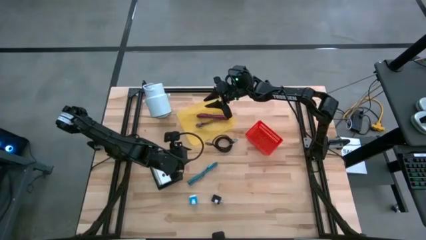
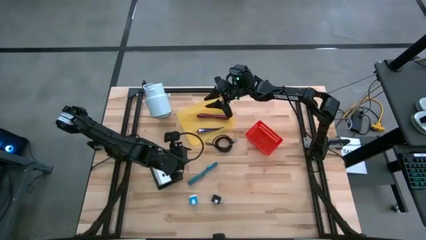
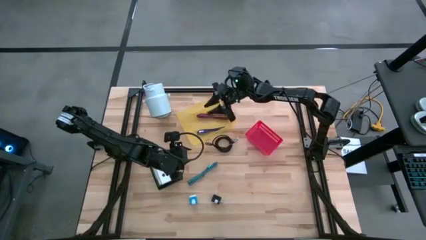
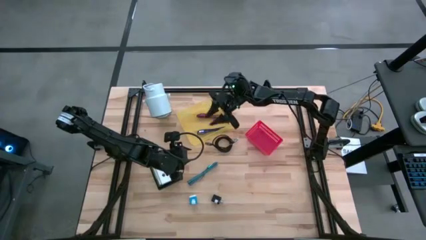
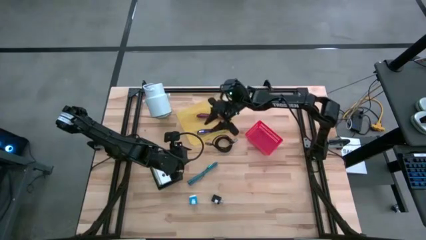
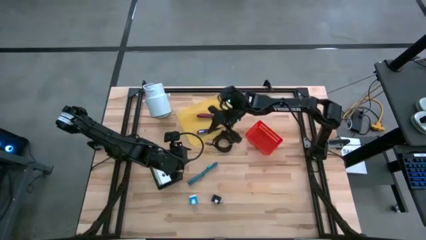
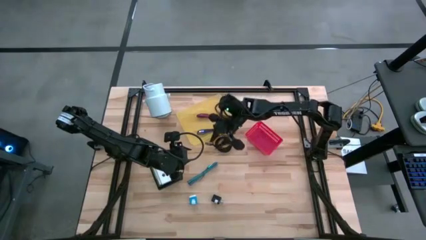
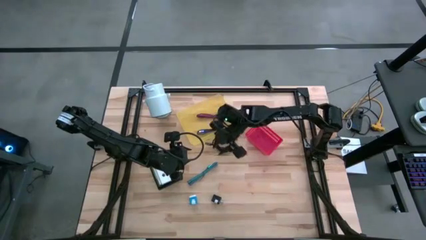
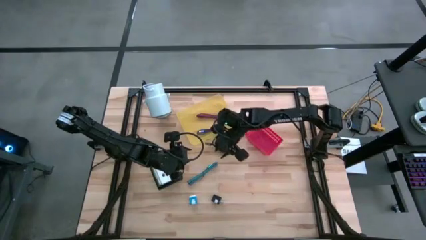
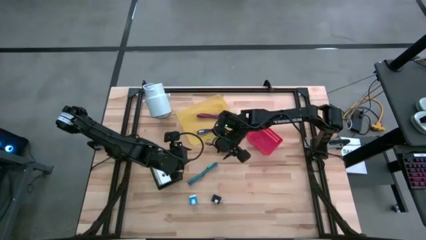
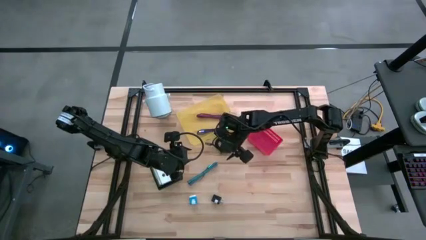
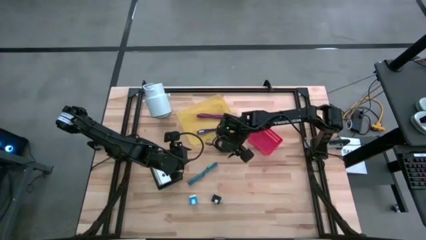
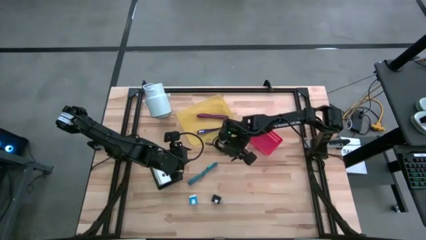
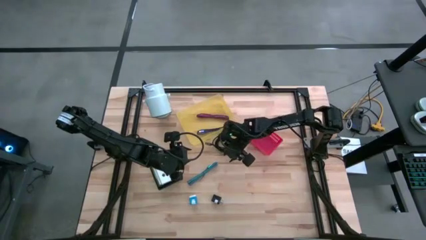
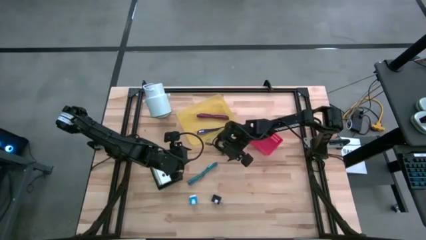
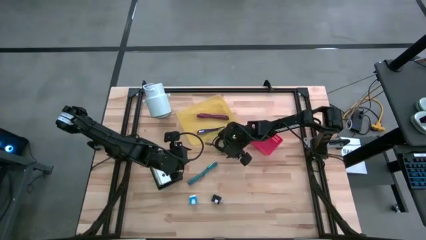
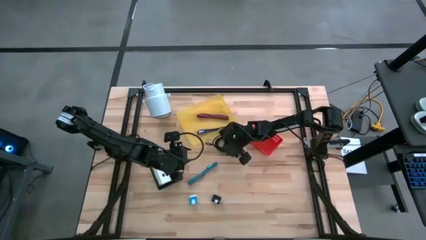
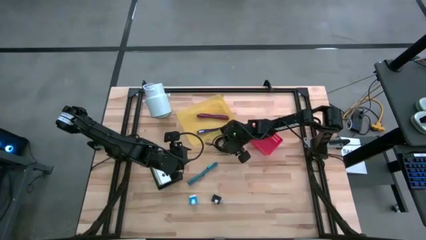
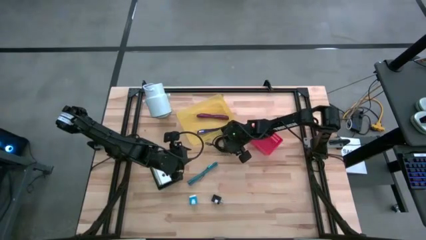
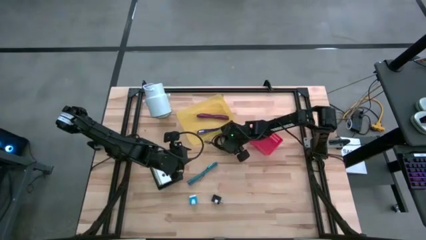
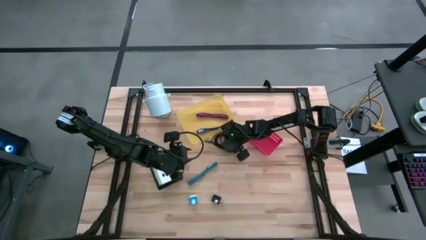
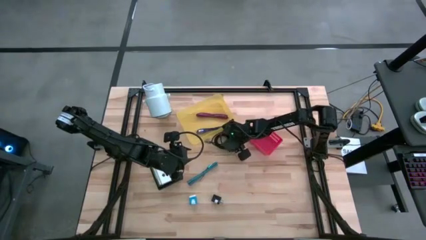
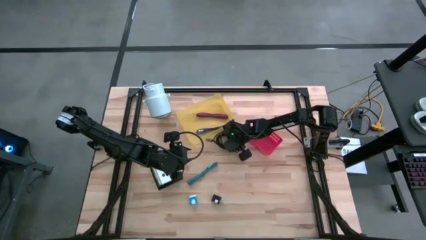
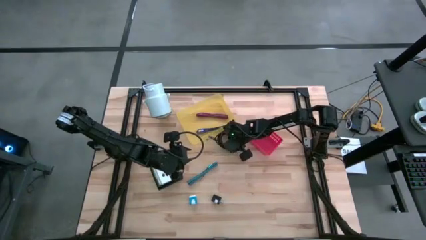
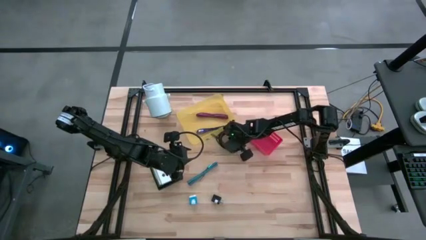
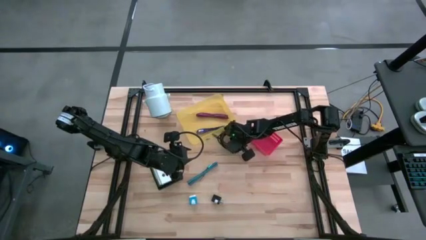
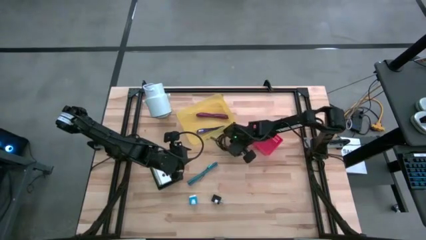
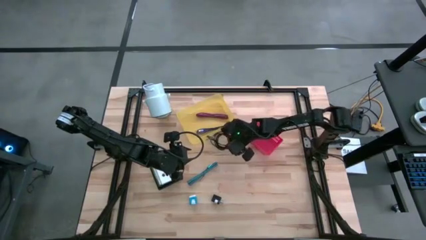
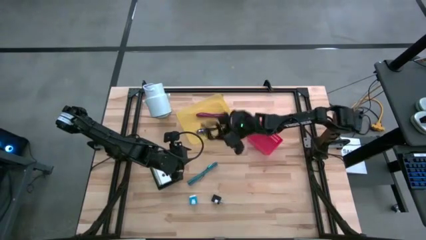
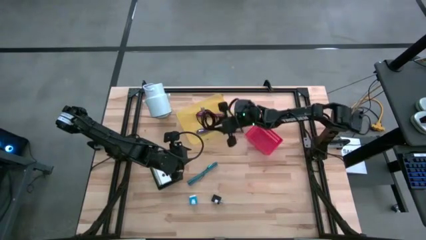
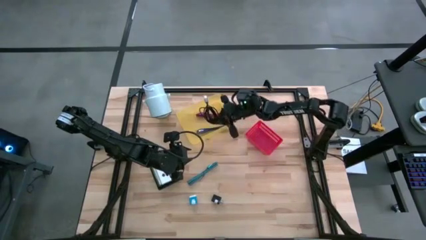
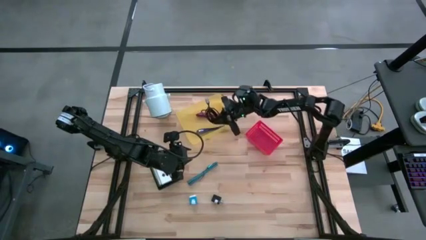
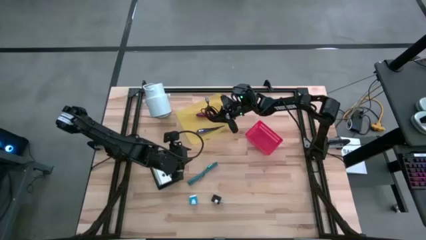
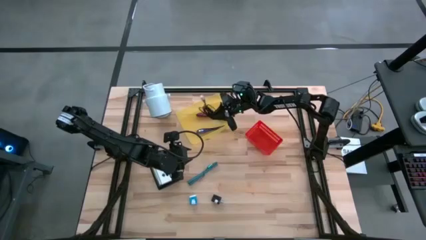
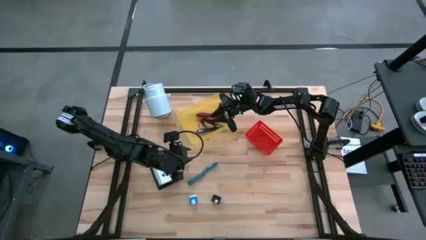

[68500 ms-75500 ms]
Task: Pick and place items into bin
Put the black charger cable into the yellow bin

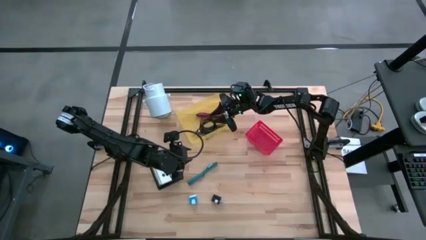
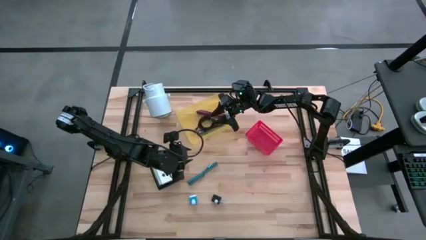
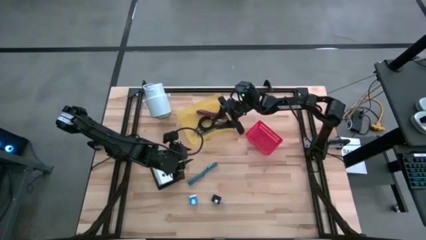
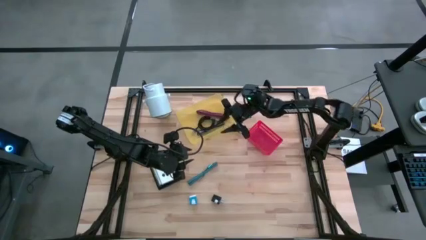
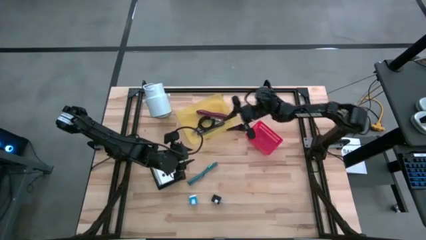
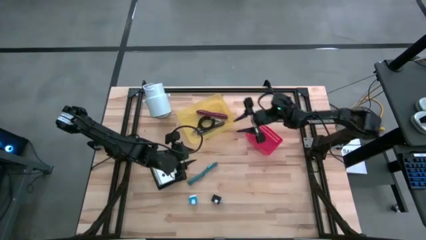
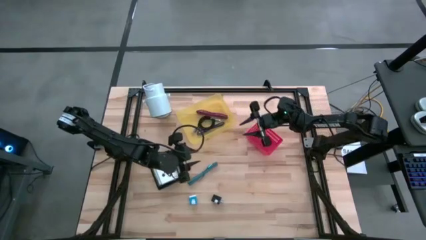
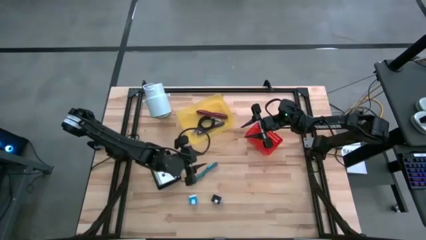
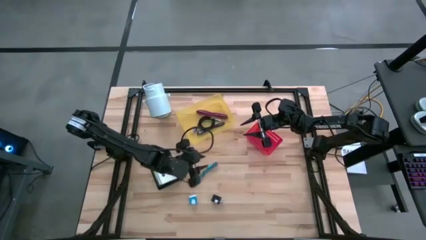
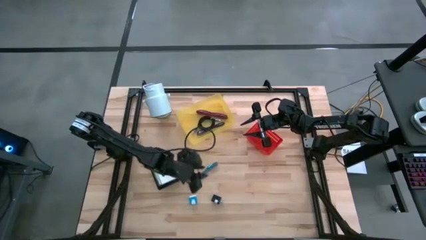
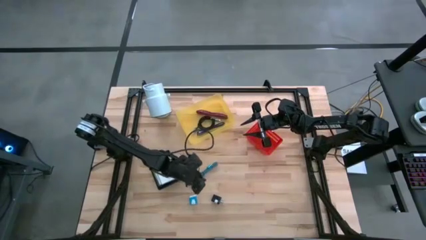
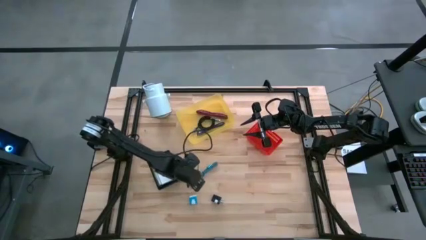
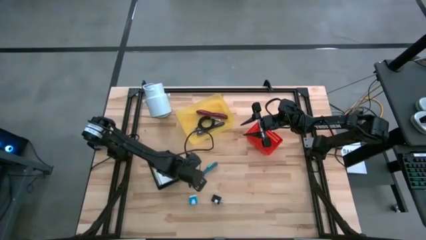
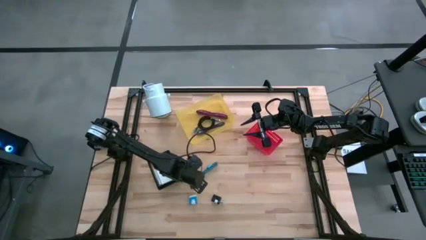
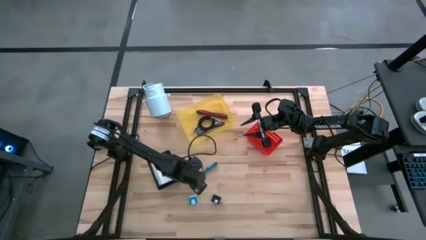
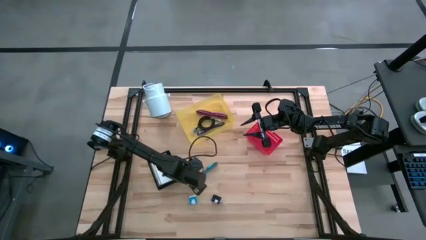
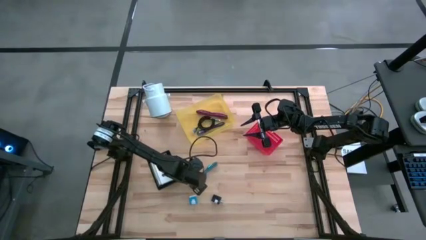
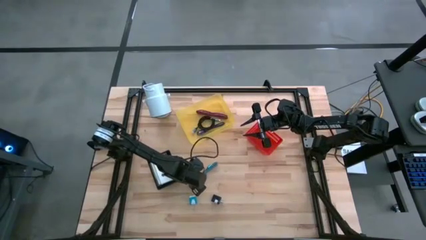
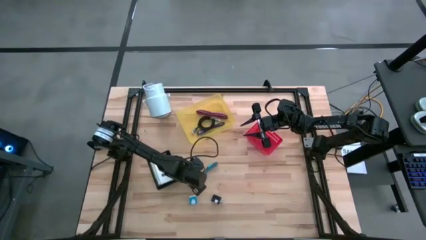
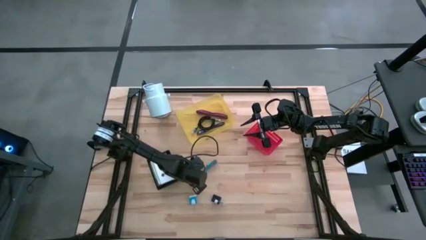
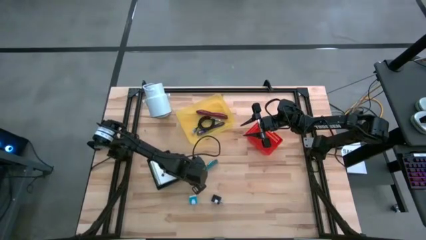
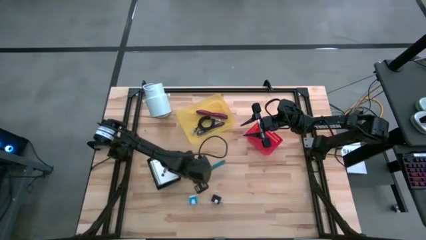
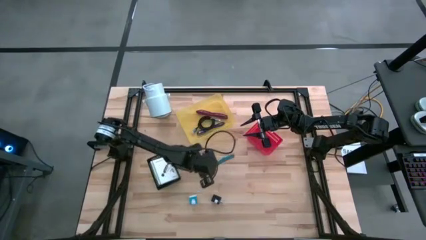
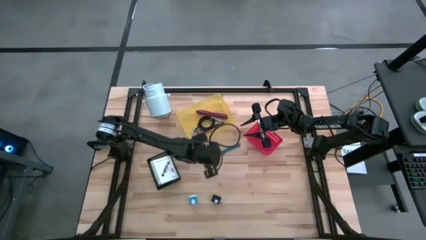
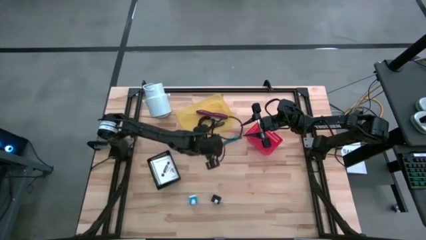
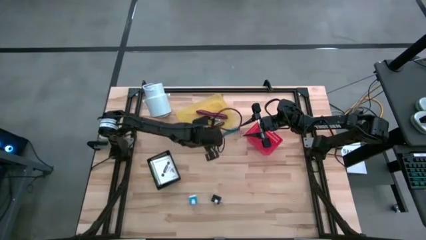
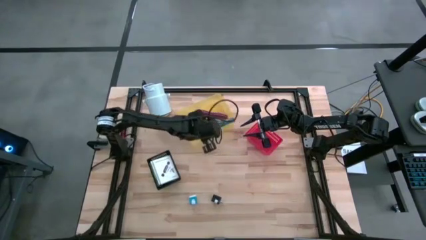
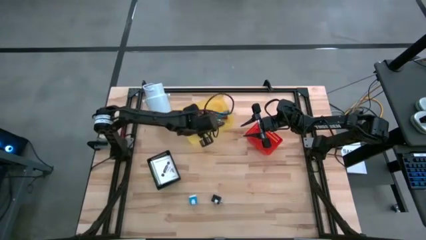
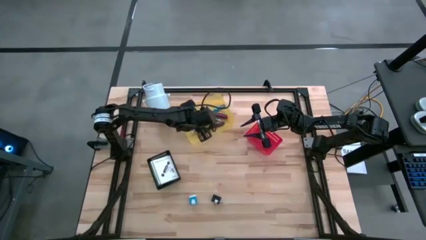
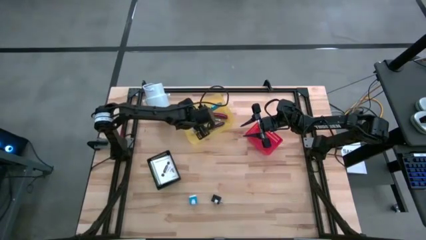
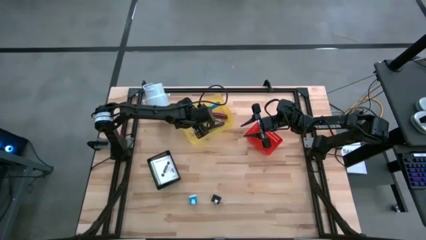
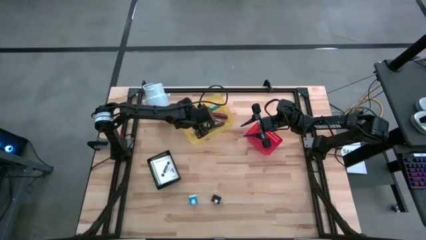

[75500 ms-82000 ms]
Put the blue charger cable into the yellow bin

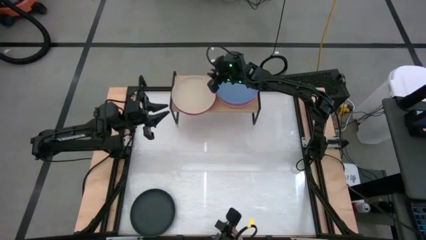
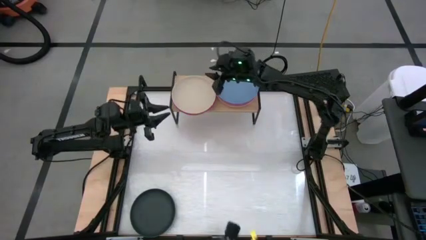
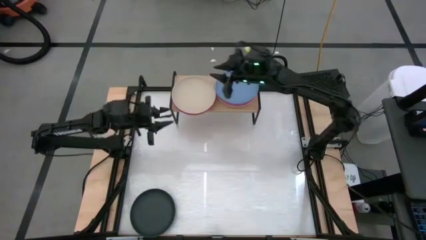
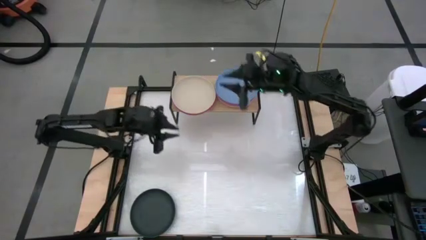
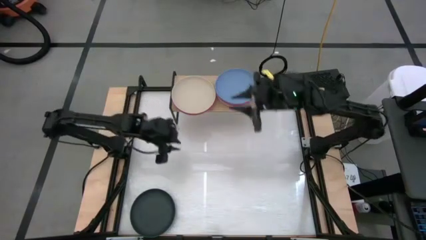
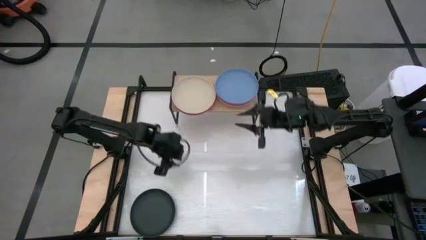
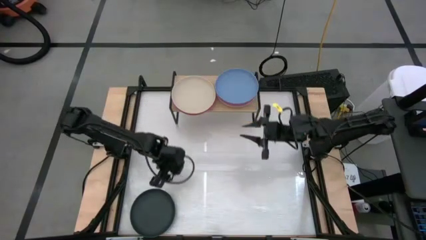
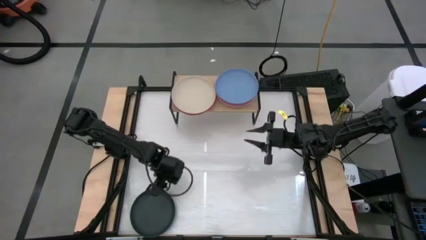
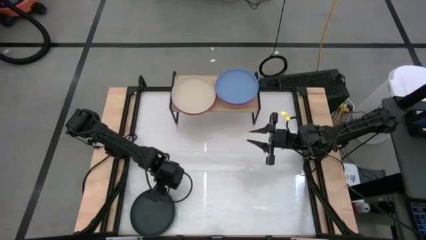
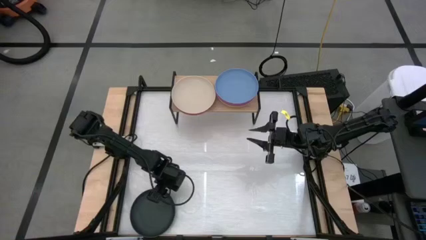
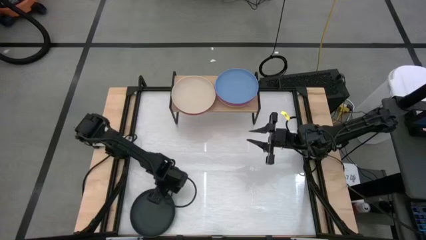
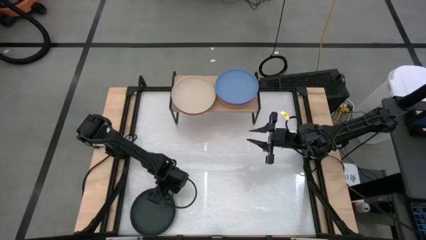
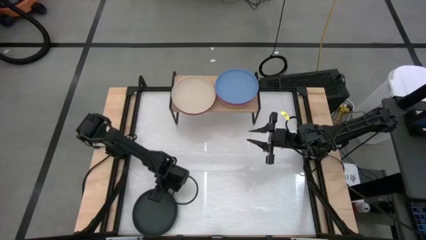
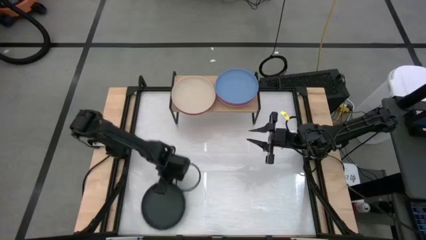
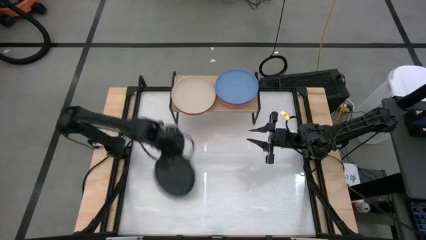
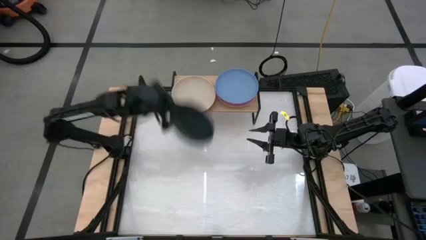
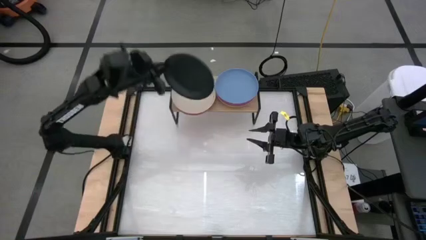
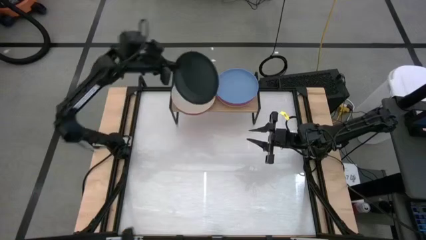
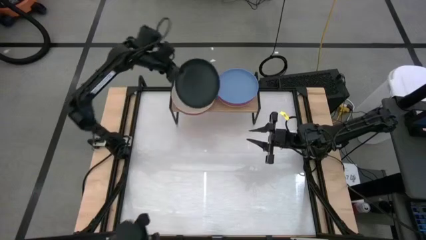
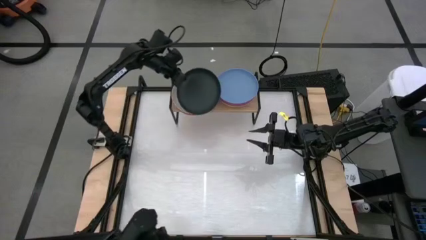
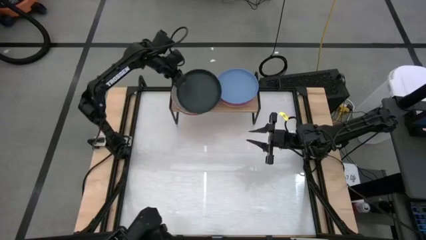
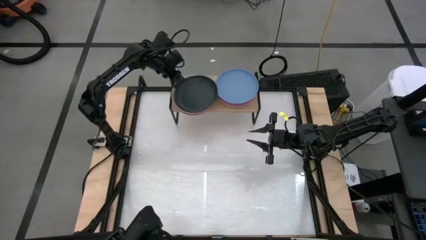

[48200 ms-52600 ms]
Task: Place and stack plates onto a shelf
Stack the black plate on top of the gray plate
